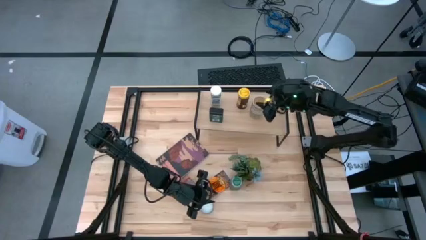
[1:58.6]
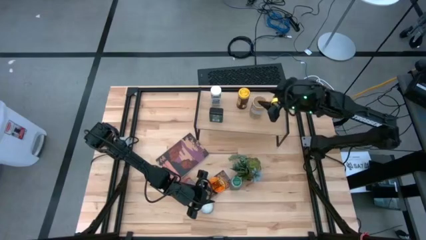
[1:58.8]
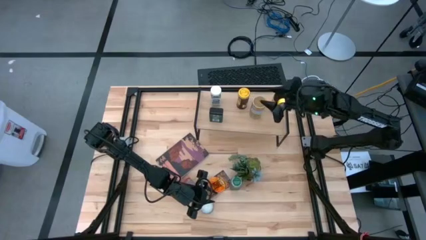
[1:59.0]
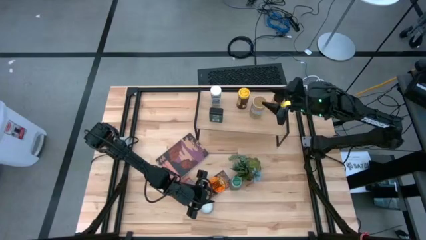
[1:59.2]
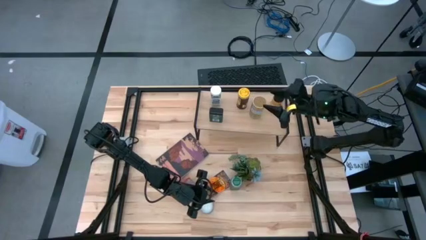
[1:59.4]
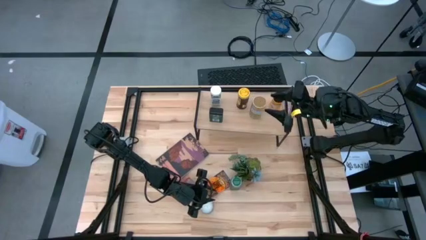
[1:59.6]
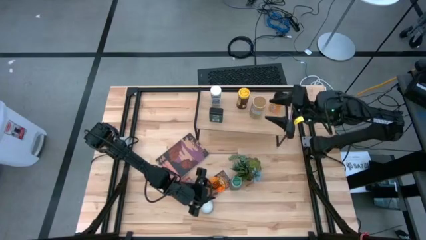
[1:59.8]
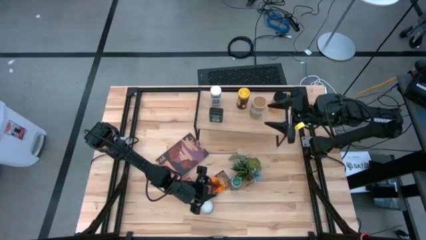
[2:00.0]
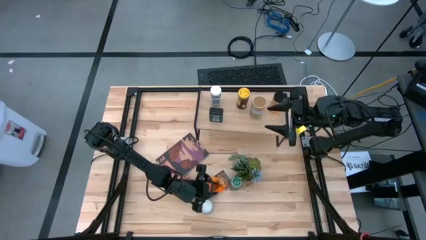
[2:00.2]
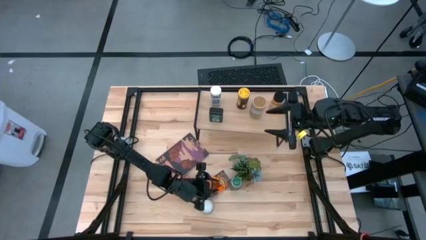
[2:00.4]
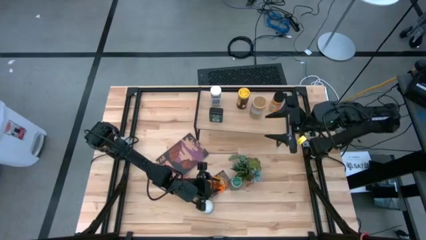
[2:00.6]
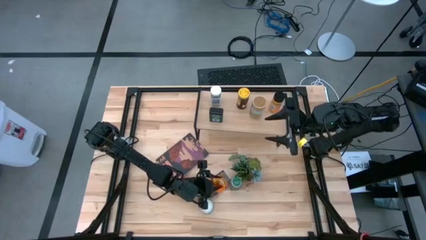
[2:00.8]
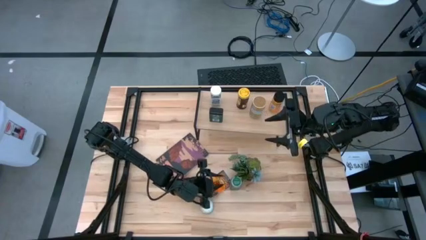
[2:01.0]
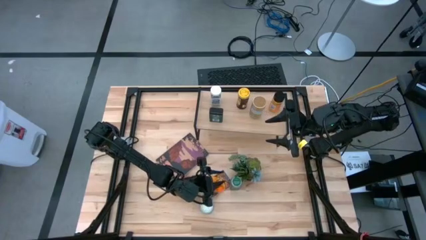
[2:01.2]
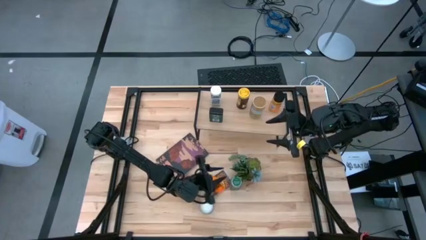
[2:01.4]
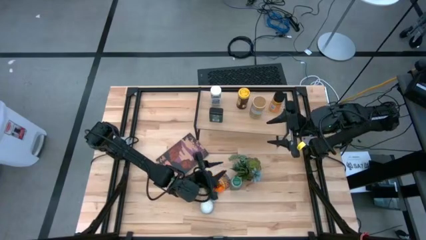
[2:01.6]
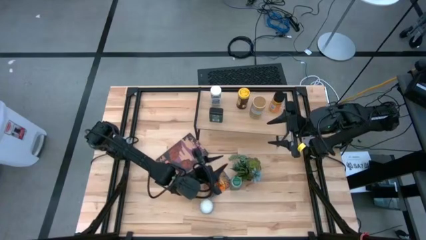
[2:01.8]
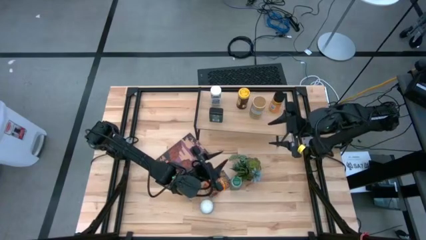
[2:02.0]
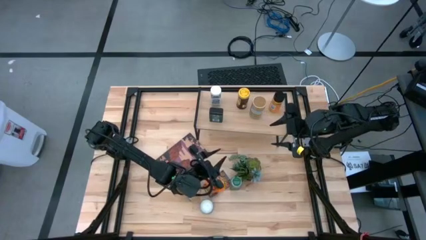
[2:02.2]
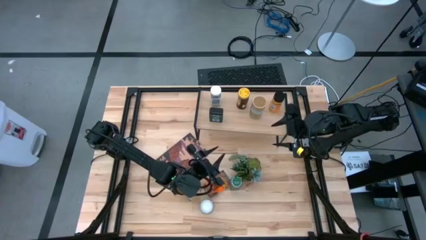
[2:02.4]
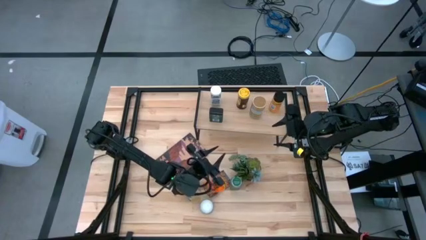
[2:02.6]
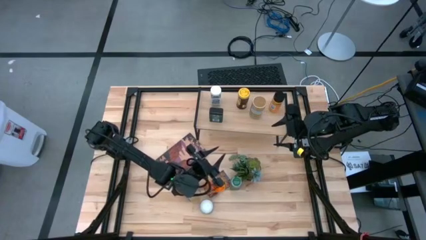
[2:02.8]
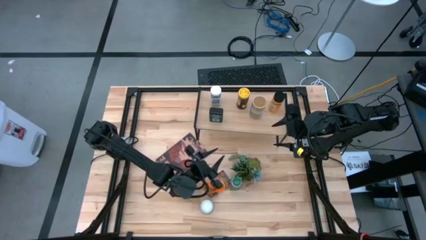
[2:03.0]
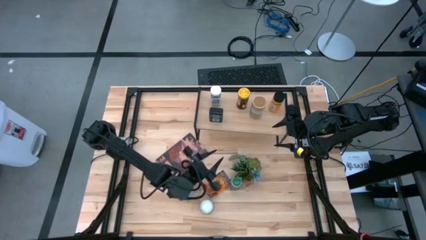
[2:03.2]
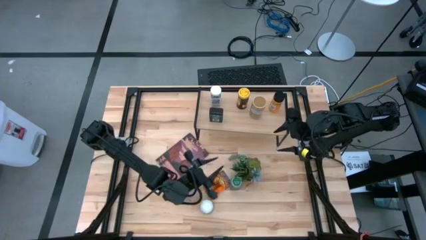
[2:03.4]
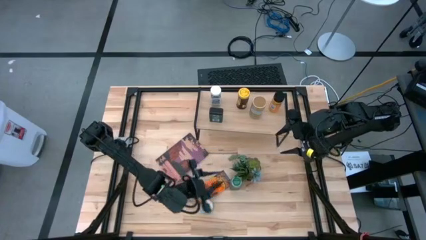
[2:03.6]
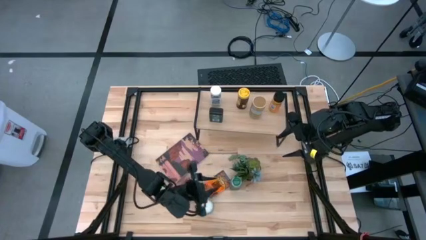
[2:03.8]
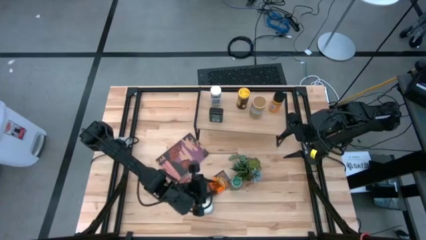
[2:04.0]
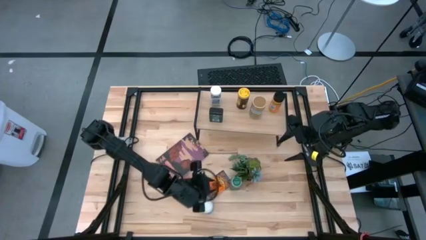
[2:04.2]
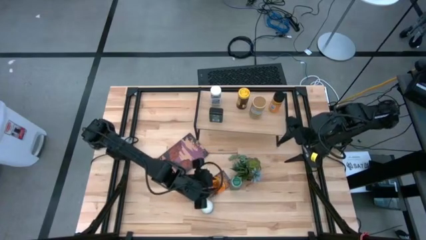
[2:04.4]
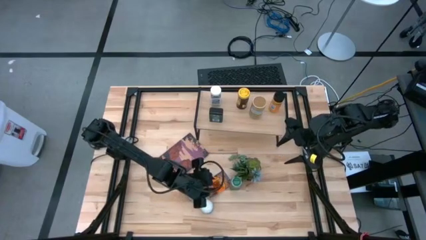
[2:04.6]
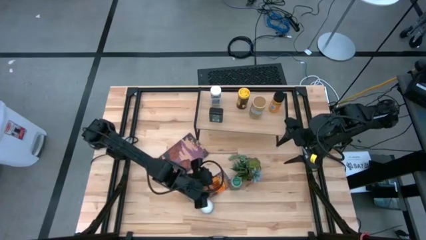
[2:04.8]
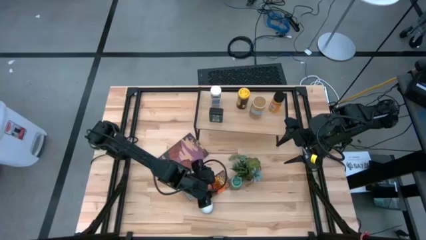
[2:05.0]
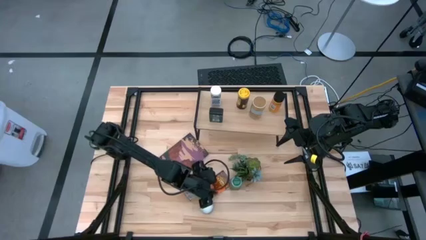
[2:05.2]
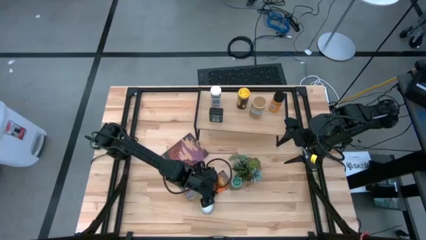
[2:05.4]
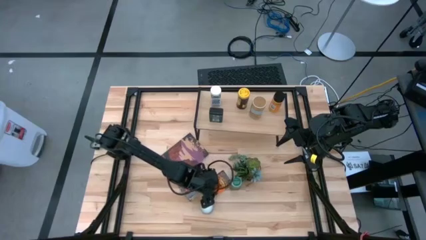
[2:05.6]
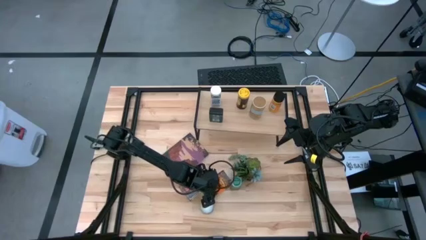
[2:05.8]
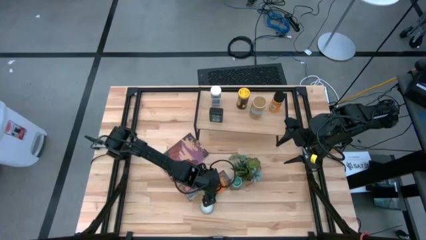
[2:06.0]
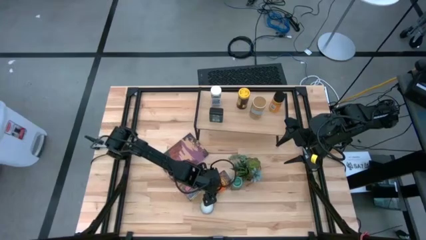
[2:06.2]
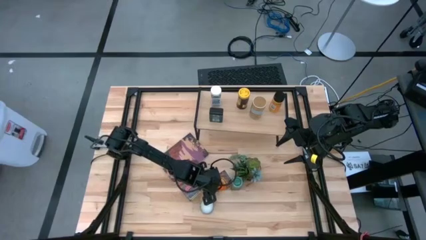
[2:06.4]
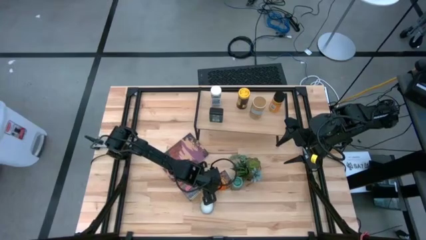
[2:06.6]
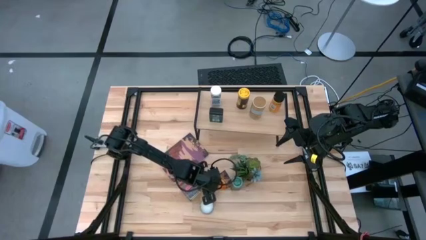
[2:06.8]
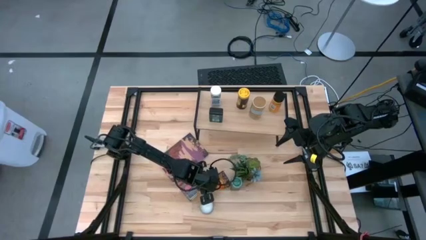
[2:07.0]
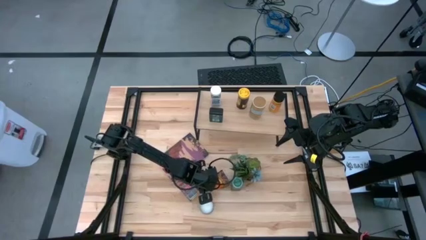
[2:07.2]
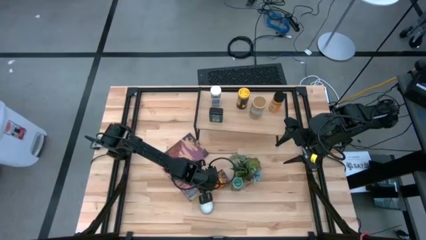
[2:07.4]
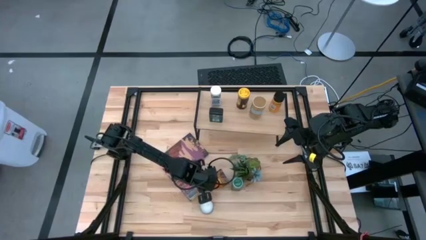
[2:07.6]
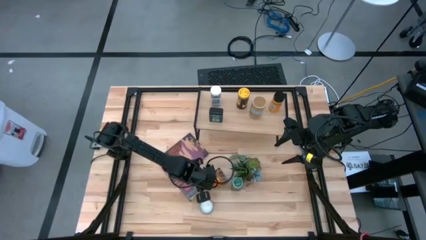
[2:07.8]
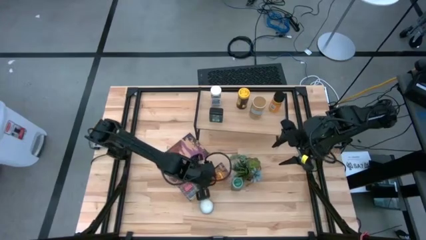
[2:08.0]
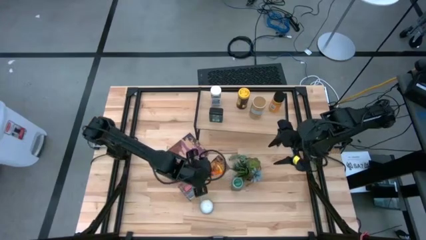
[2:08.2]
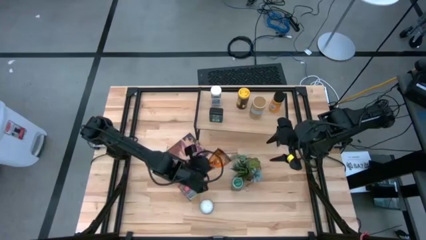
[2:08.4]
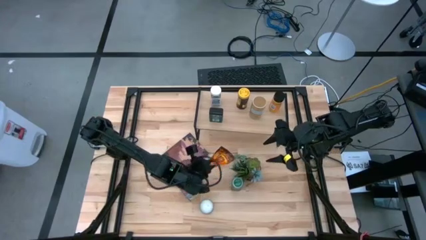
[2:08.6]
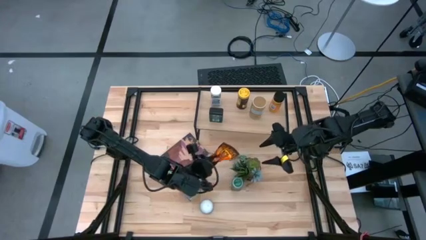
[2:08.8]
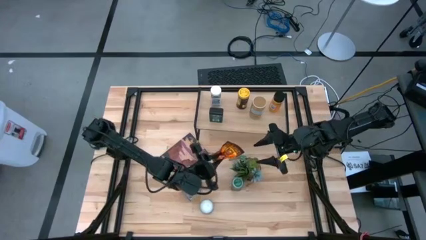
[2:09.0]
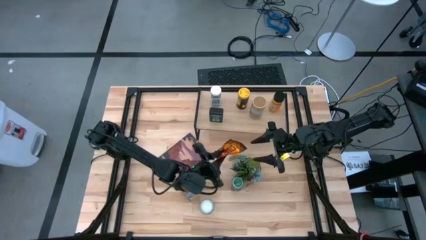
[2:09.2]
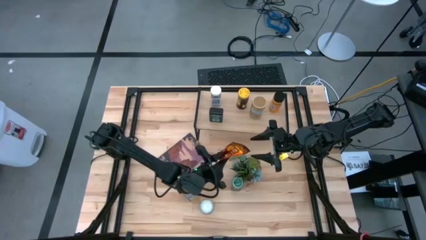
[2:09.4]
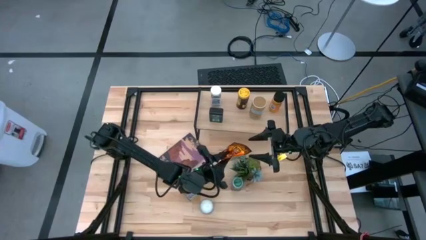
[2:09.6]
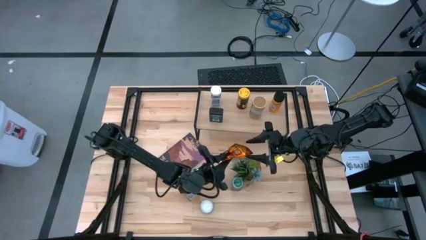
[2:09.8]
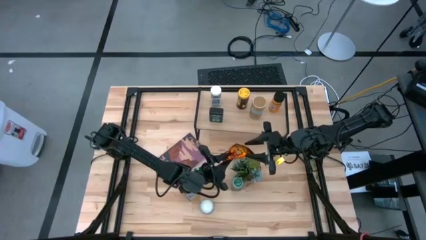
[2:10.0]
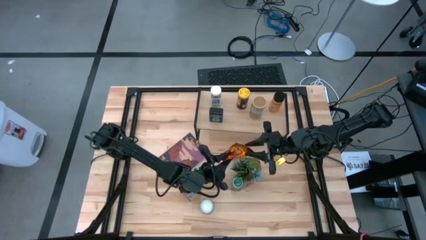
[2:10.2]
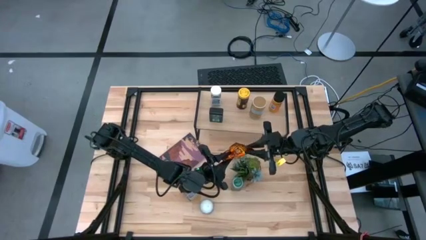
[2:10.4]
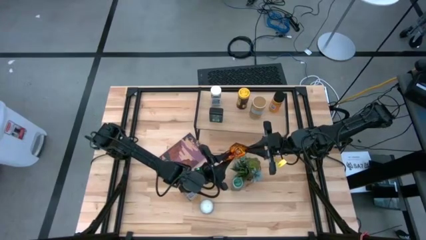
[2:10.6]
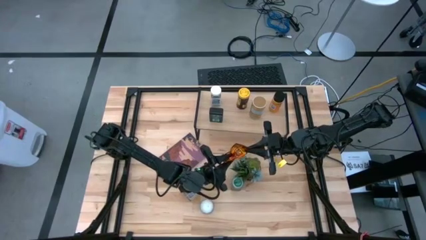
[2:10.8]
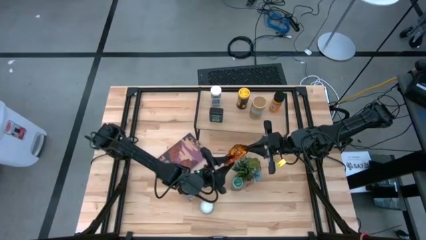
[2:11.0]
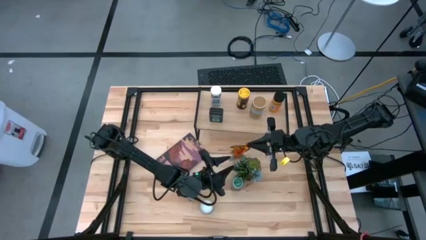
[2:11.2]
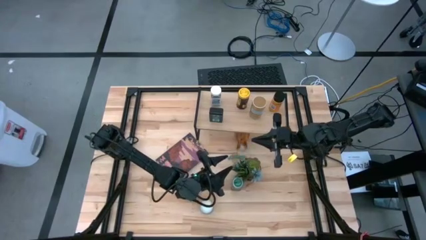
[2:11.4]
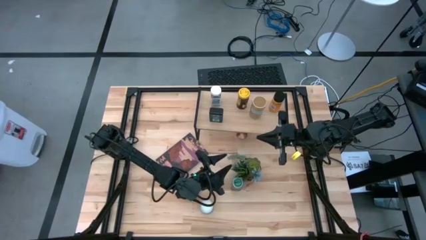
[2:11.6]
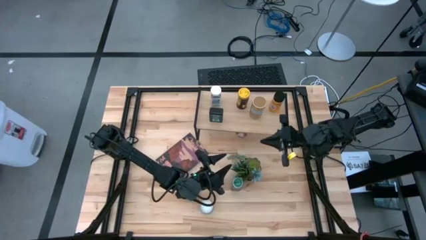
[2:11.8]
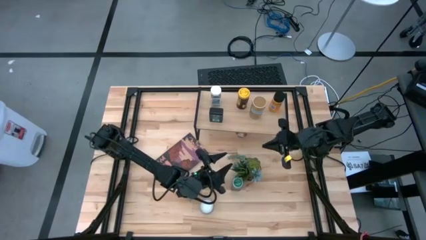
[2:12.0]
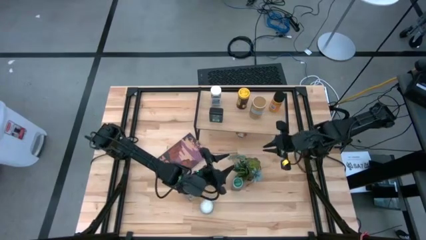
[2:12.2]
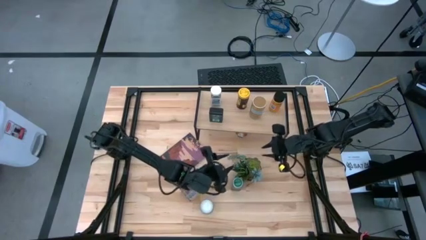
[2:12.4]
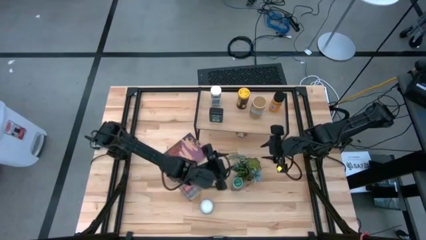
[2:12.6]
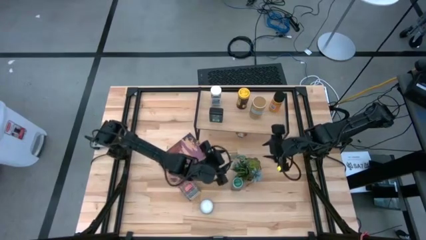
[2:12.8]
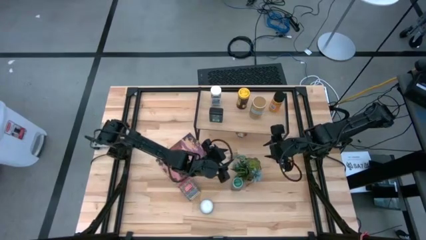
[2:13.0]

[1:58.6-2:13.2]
Task: Shelf spices
Put the orange seasoning bag on the shelf

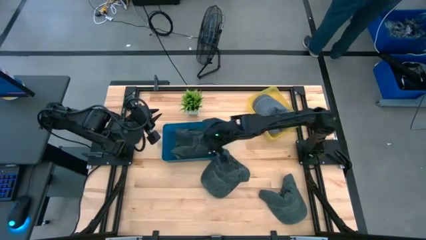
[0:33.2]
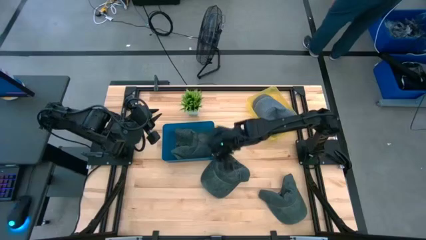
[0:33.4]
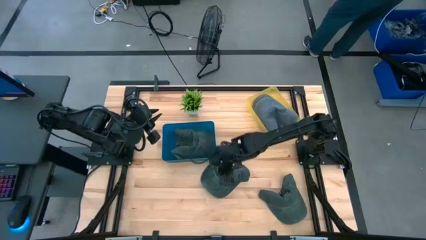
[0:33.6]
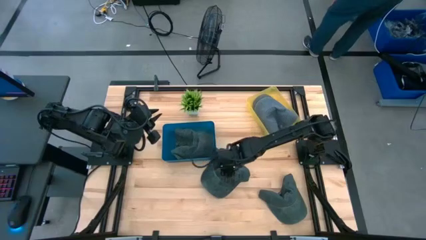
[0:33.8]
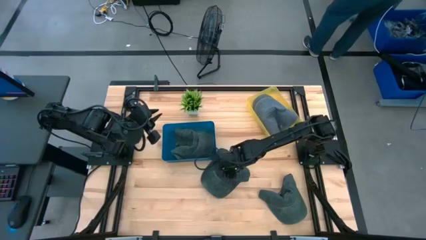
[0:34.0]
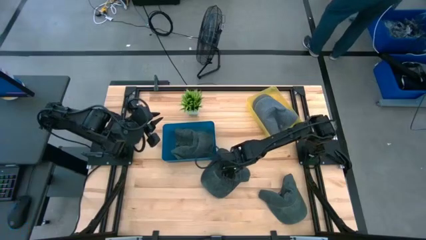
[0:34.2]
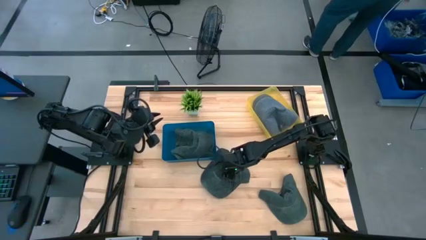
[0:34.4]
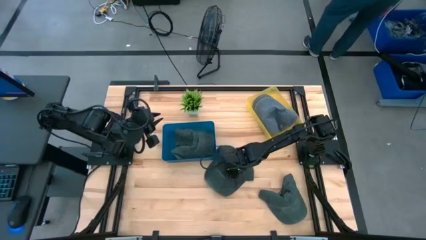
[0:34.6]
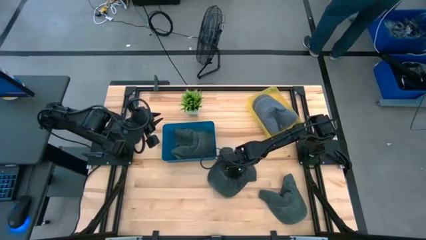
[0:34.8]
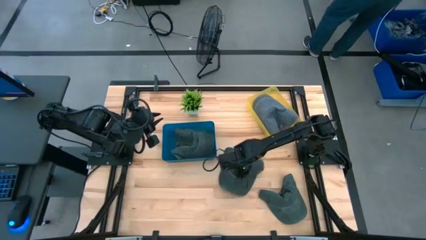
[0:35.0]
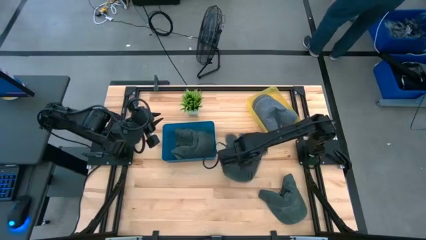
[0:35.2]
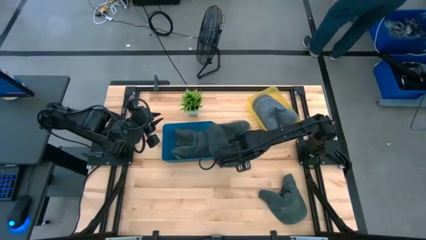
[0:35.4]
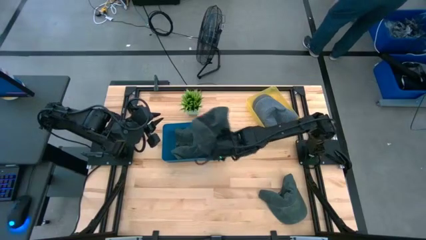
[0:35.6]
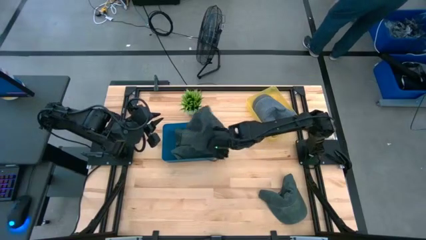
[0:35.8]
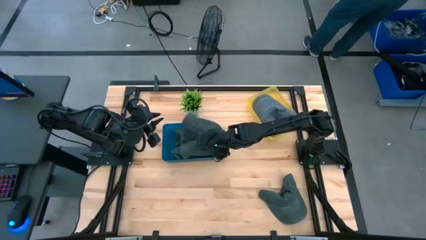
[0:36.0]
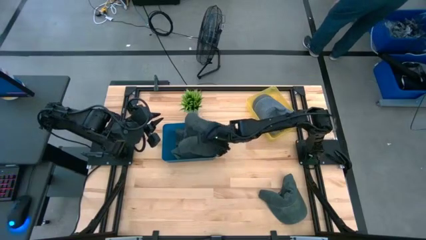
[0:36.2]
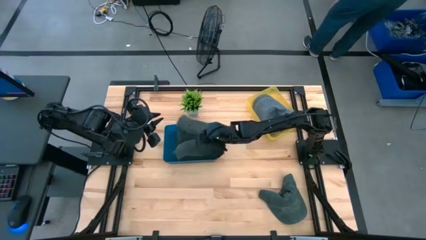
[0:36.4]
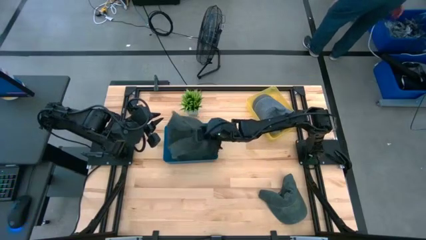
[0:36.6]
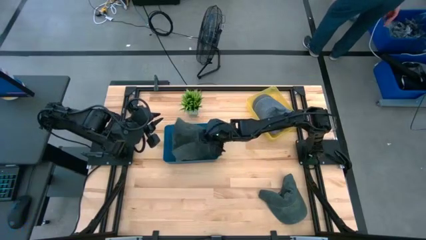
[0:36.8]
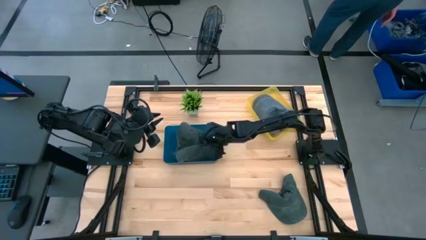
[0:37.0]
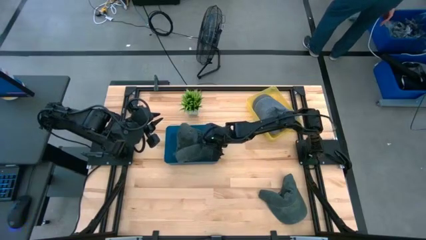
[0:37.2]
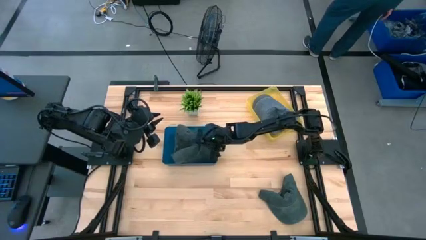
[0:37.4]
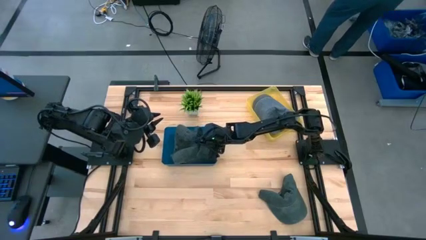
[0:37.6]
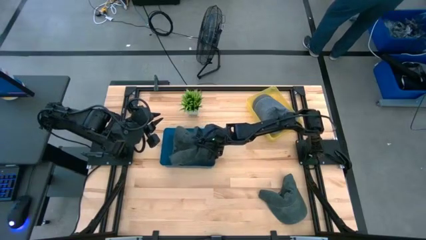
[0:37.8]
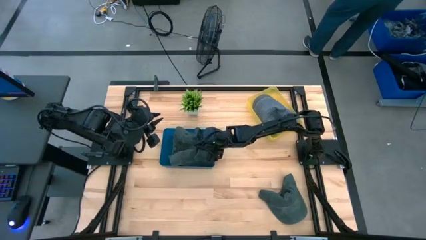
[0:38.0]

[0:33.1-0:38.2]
Task: Pick & Place hat
Put the left cap into the blue bin
